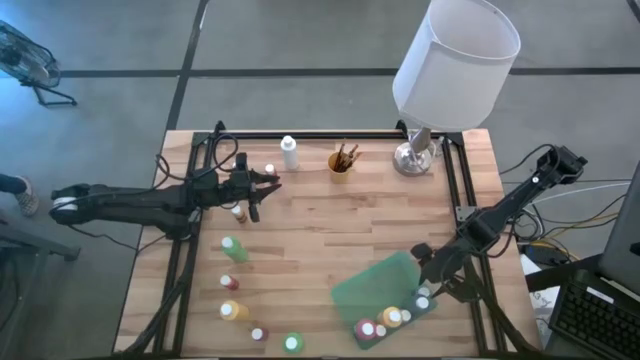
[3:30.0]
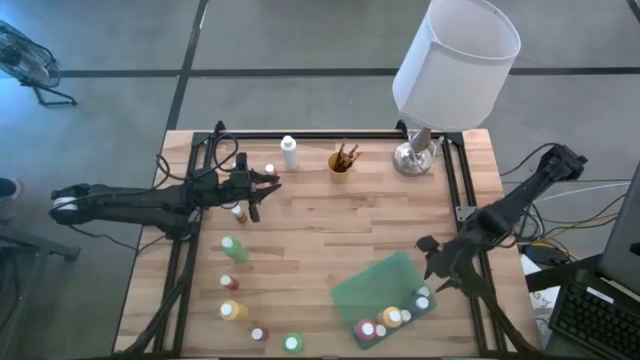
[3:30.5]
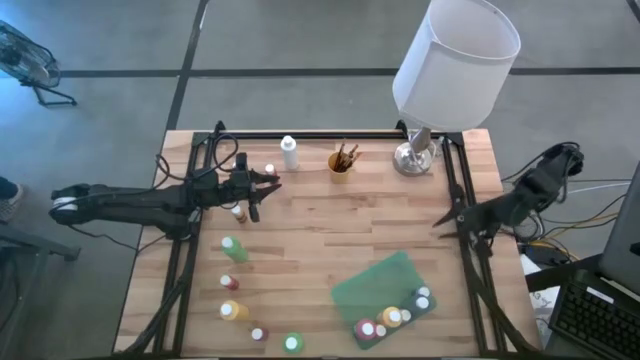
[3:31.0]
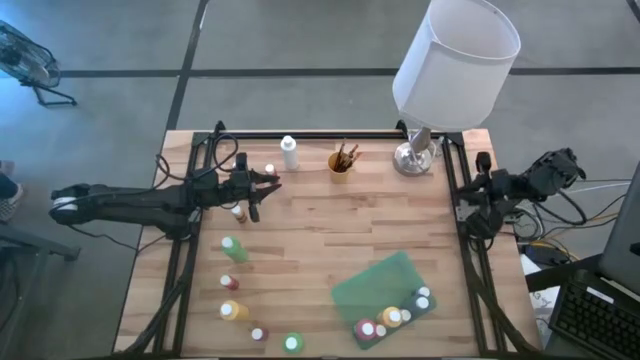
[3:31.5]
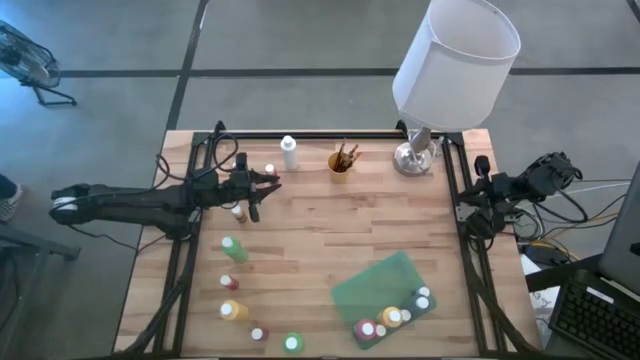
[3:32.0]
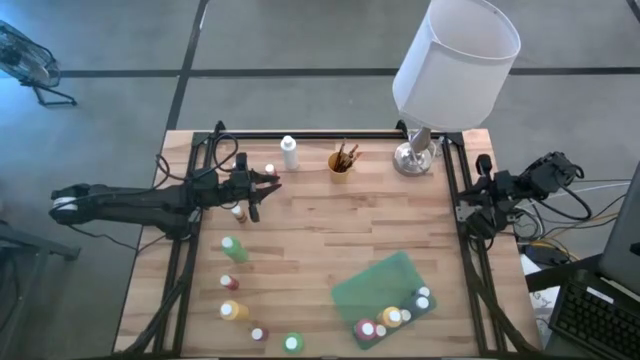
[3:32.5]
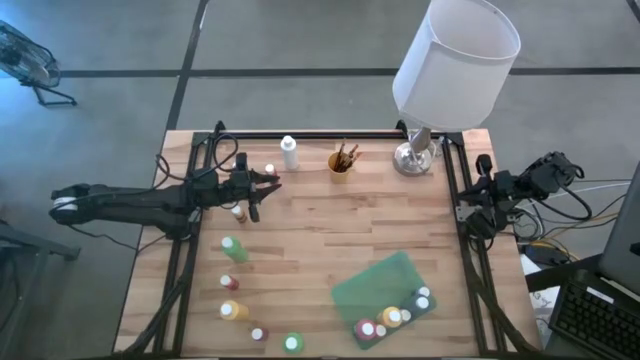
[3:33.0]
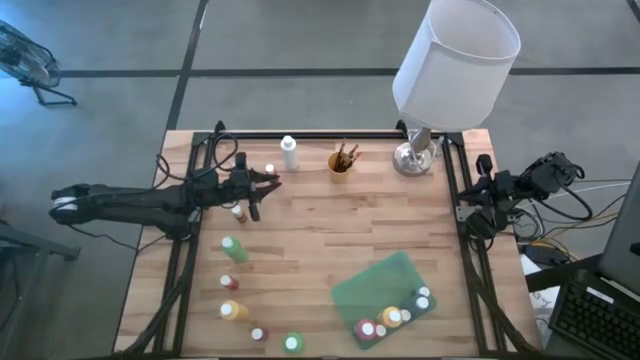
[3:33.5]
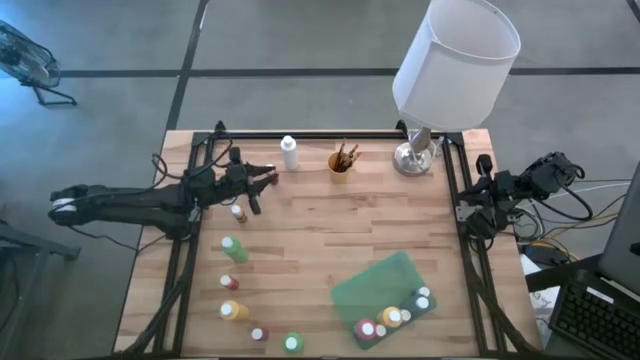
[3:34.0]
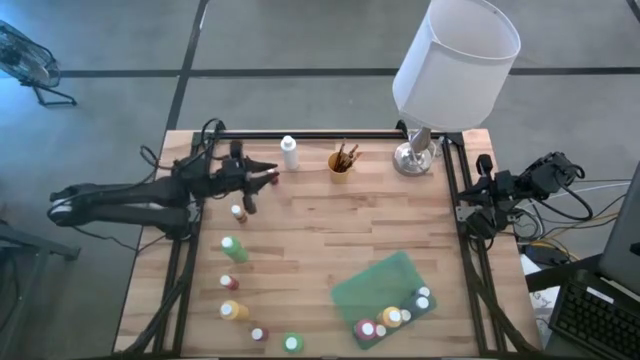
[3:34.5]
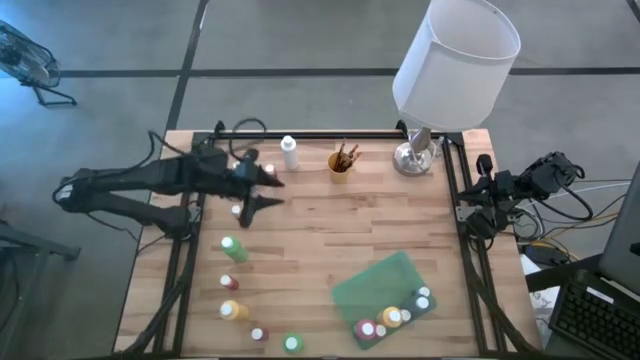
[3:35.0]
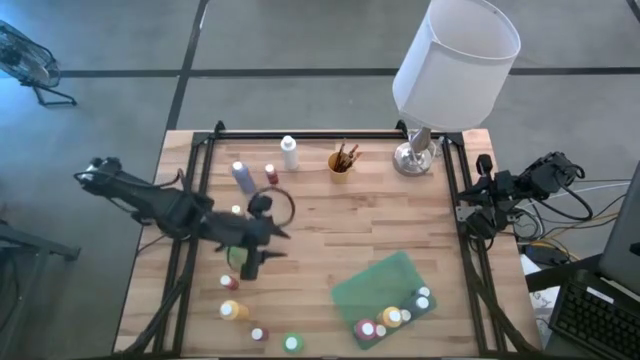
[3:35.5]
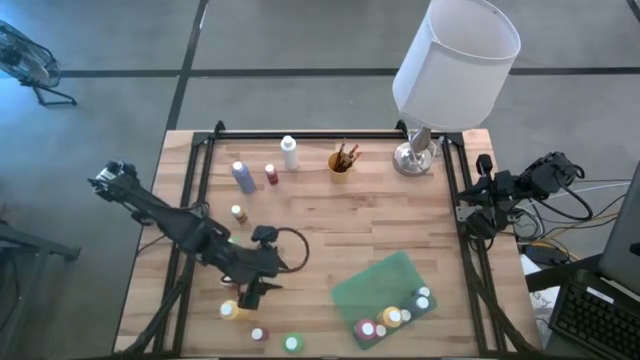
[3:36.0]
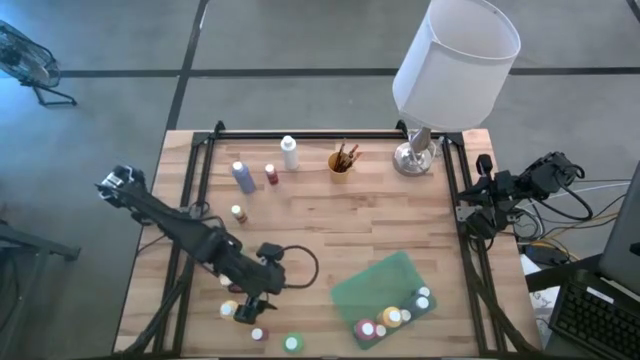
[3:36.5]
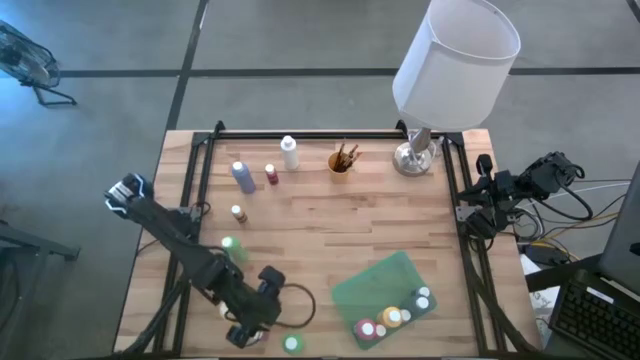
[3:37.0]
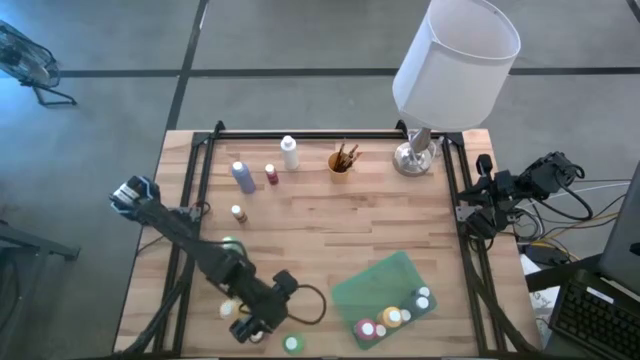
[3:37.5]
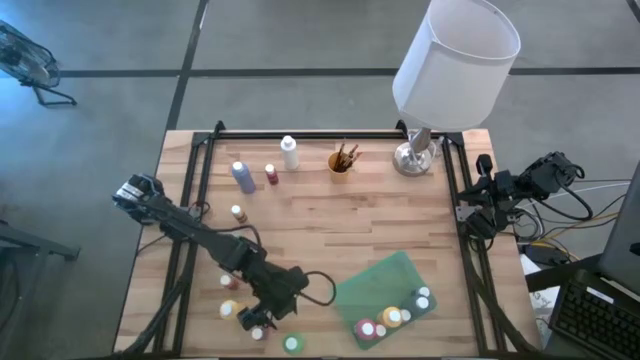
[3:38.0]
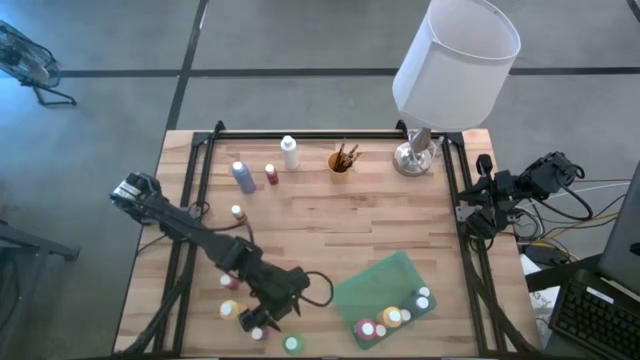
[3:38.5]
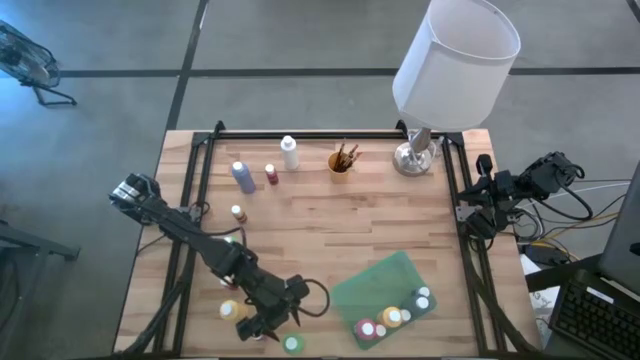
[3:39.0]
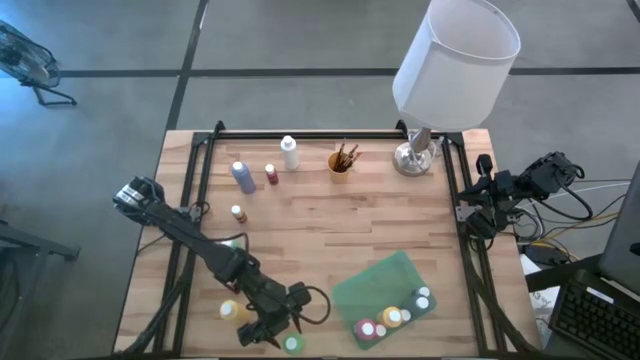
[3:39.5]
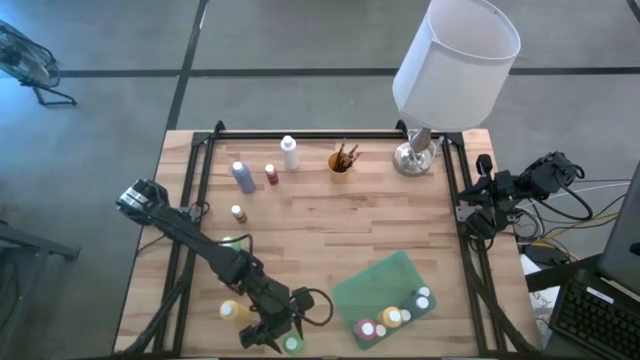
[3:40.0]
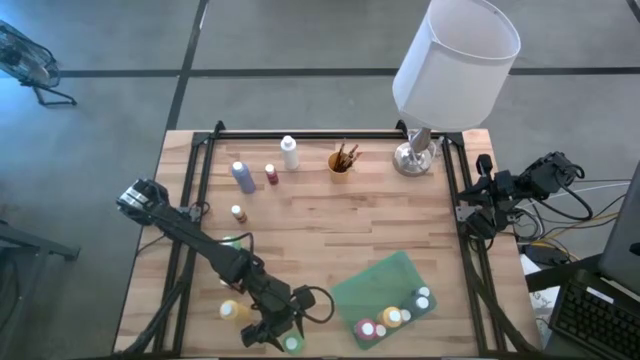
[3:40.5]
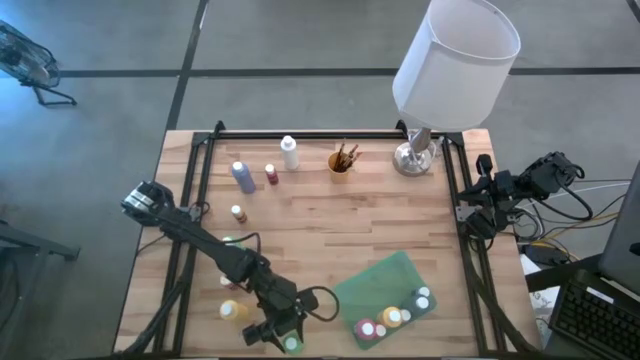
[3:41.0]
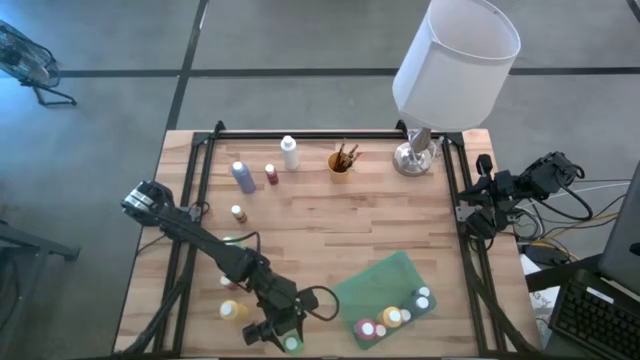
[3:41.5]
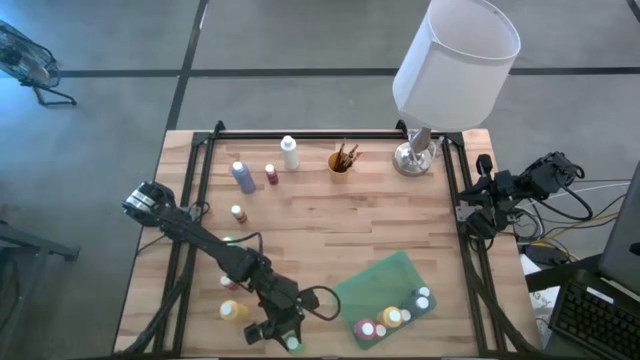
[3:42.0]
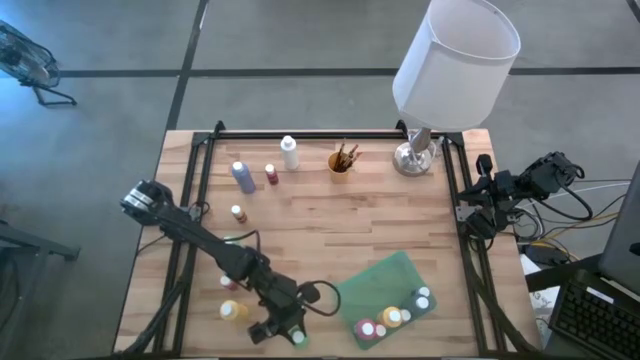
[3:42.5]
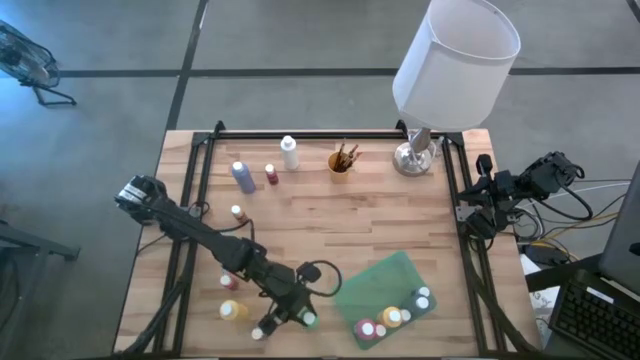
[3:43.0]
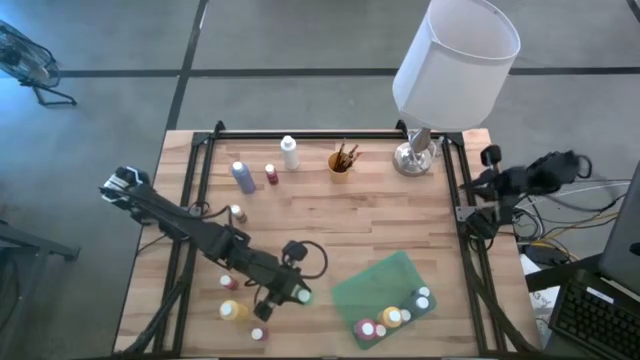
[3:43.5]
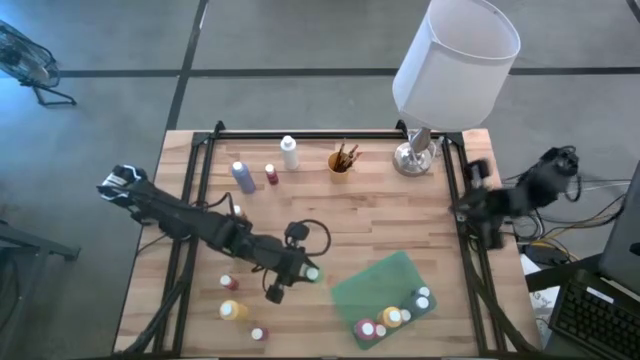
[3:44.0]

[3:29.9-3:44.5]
Task: Pick & Place Paint Supplies
Put the big green paint bottle into the green bin

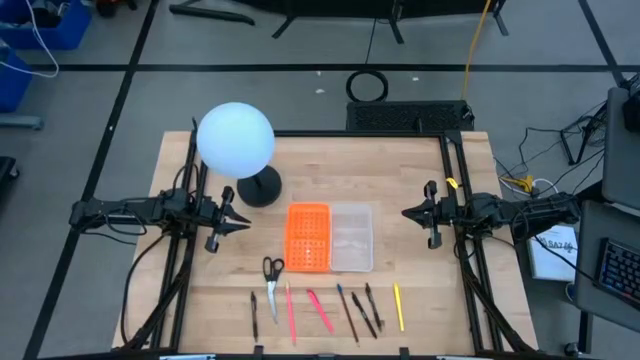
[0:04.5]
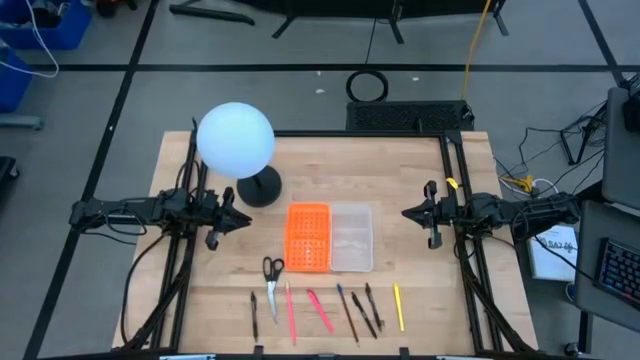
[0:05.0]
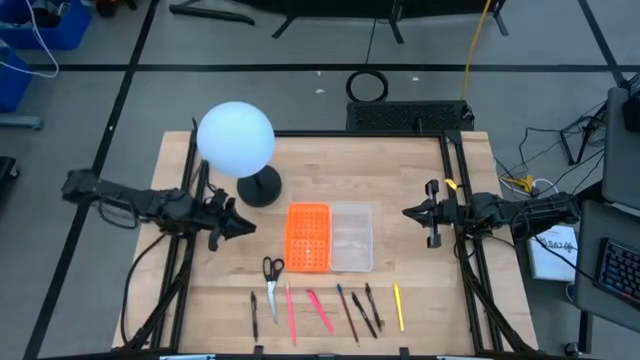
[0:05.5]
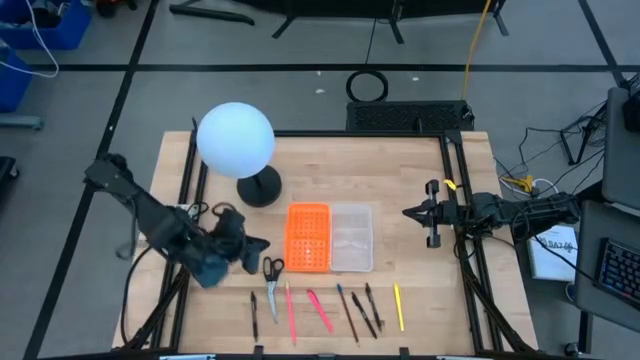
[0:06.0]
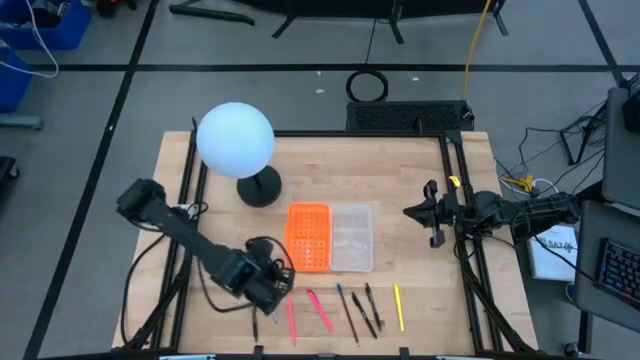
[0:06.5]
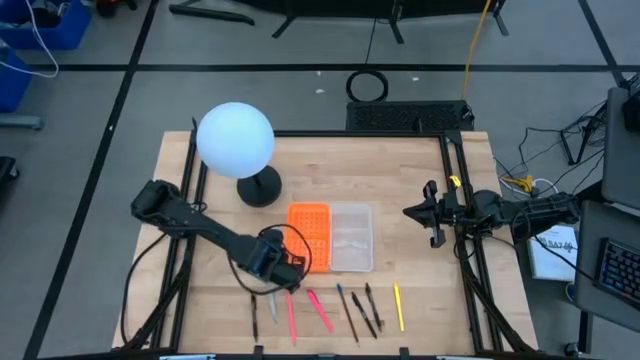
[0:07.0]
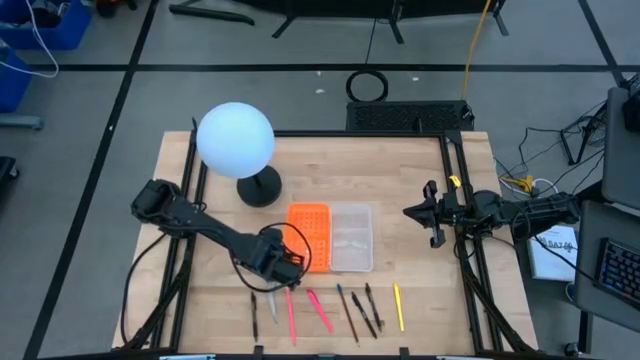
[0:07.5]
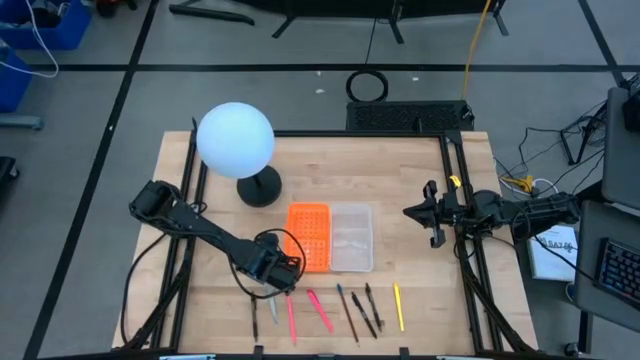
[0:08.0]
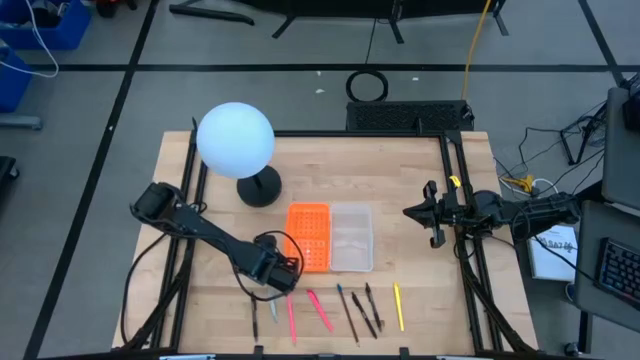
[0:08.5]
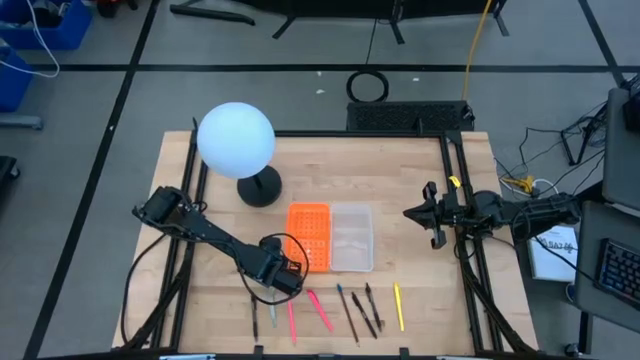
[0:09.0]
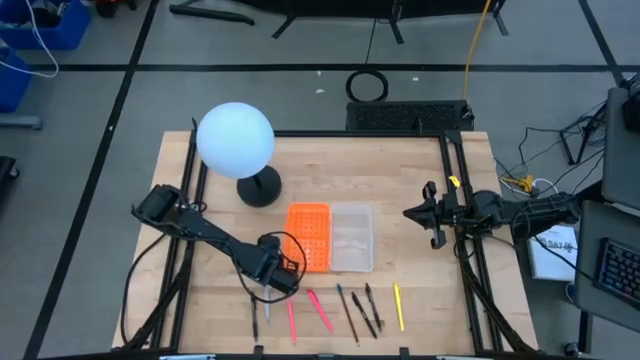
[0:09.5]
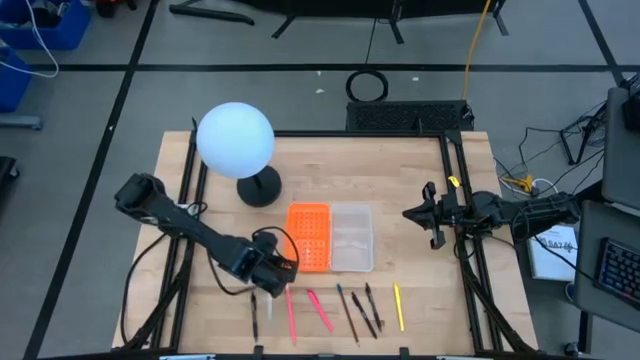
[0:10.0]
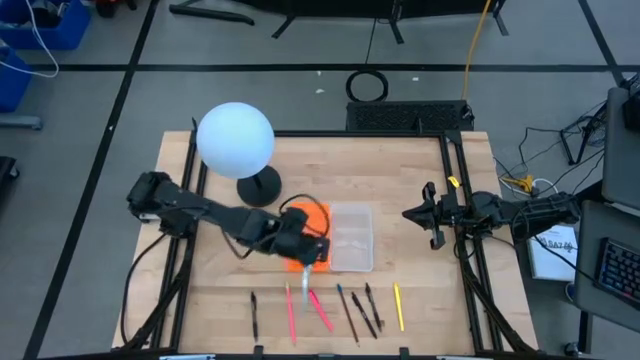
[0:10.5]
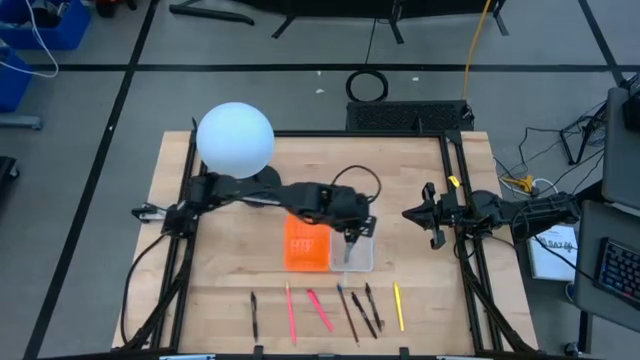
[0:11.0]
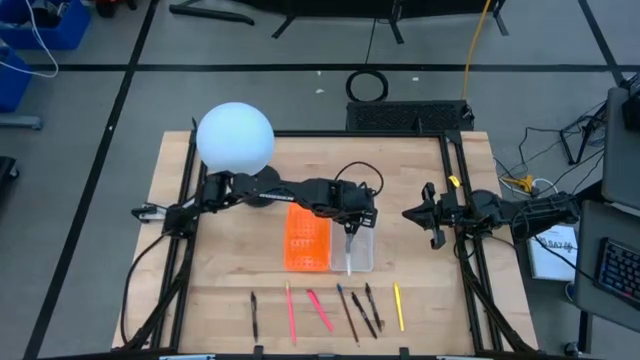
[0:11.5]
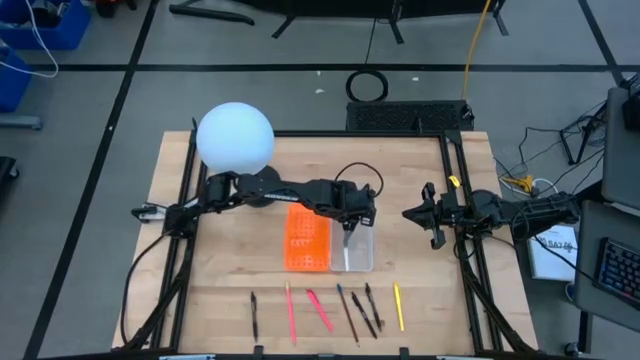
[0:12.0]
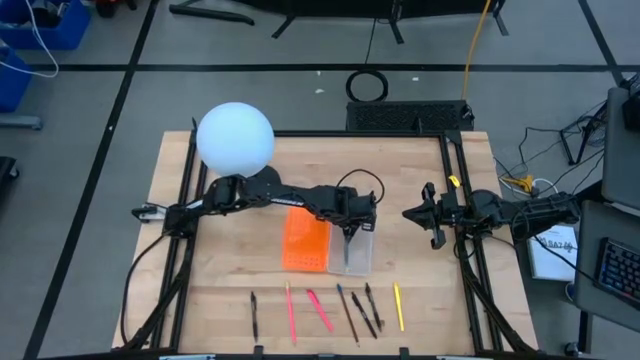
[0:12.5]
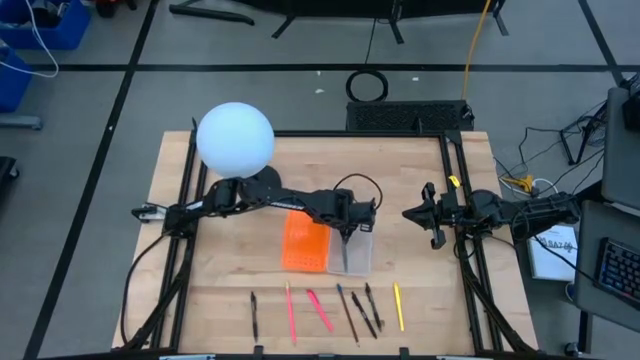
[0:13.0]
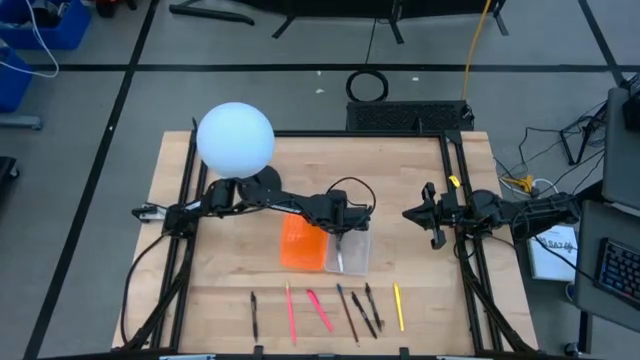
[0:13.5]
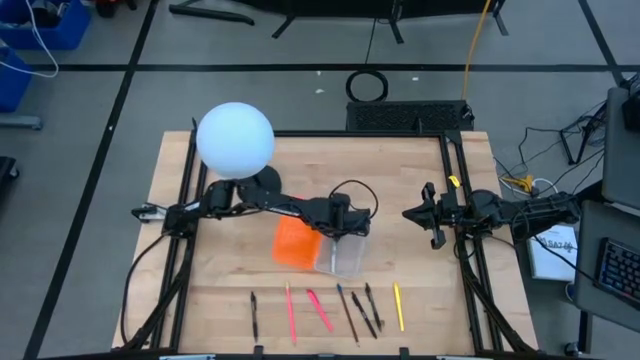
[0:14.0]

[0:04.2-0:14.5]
Task: Pick & place school supplies into a supply box
Put the black scissors into the transparent bin
